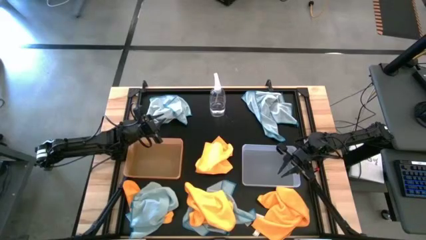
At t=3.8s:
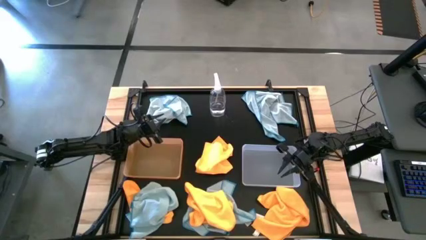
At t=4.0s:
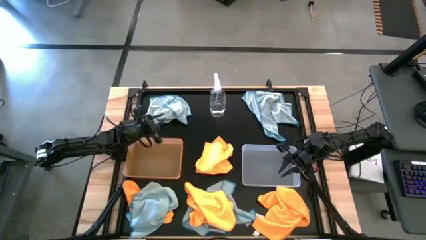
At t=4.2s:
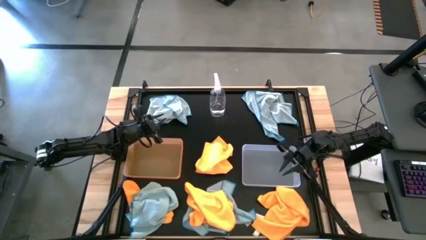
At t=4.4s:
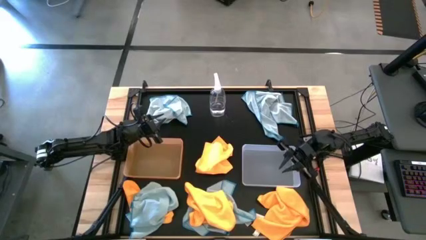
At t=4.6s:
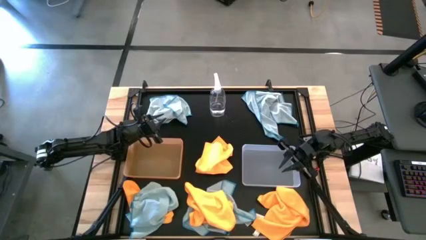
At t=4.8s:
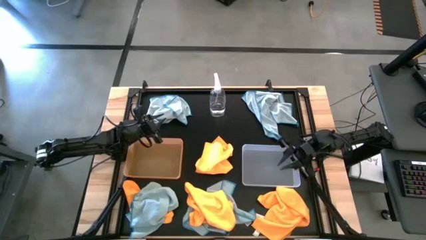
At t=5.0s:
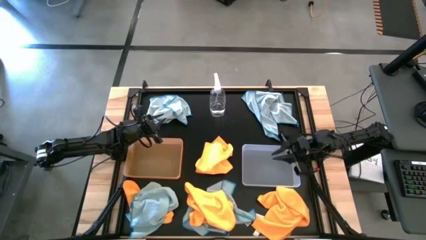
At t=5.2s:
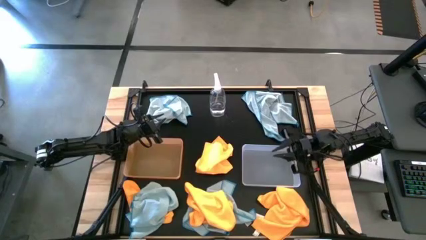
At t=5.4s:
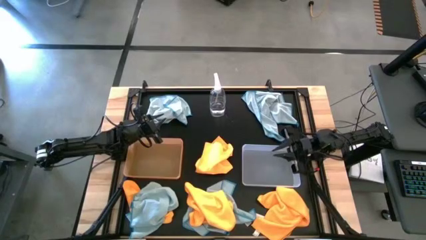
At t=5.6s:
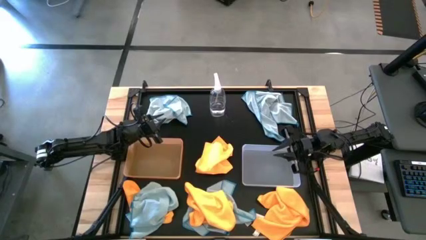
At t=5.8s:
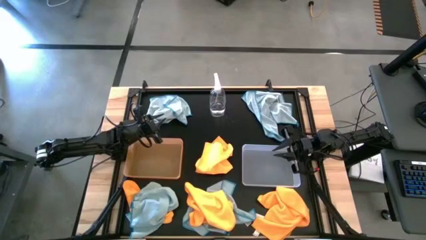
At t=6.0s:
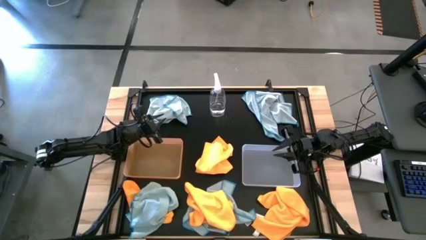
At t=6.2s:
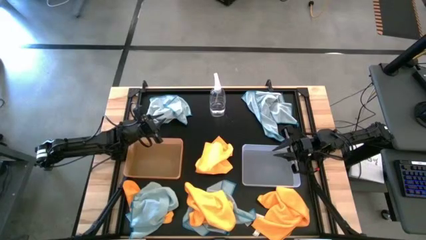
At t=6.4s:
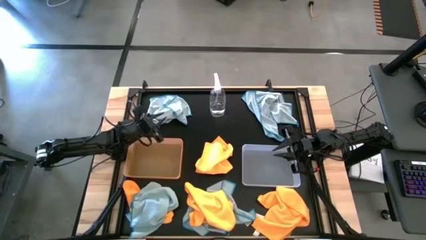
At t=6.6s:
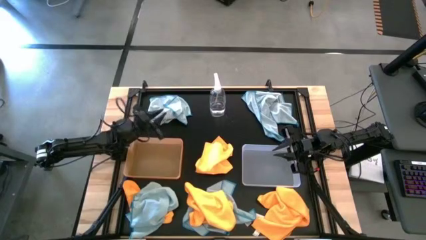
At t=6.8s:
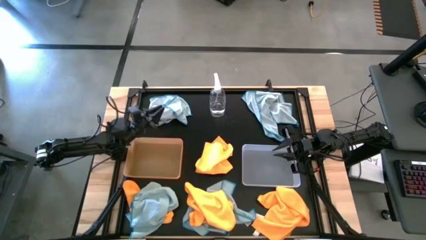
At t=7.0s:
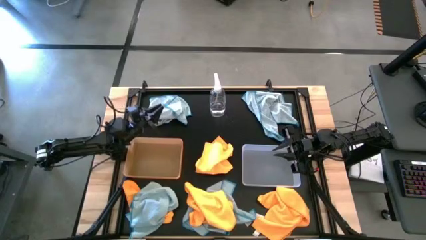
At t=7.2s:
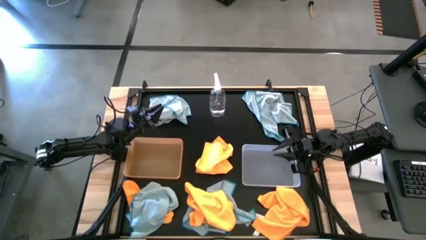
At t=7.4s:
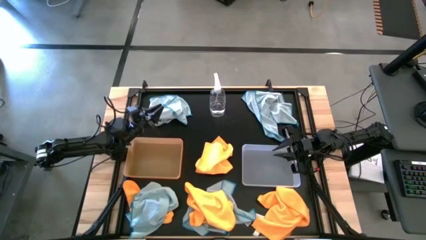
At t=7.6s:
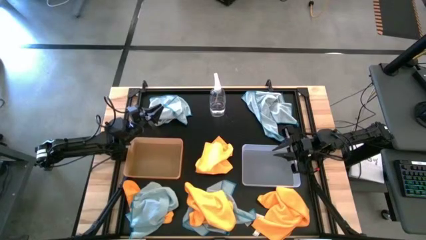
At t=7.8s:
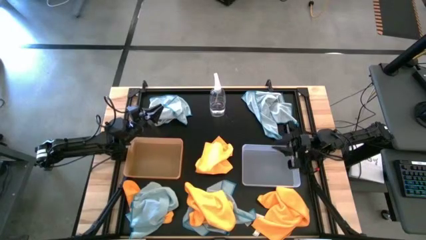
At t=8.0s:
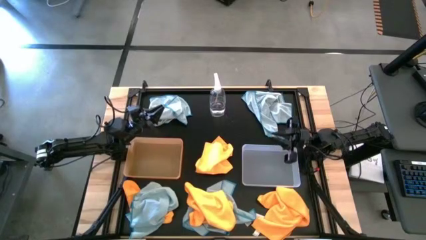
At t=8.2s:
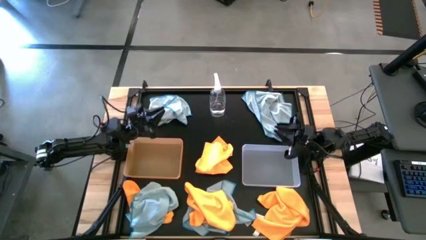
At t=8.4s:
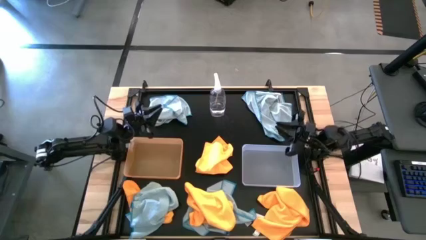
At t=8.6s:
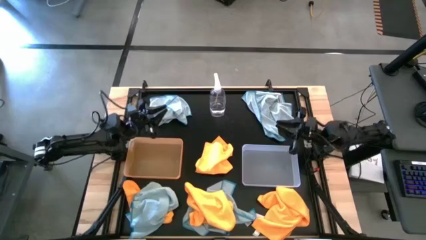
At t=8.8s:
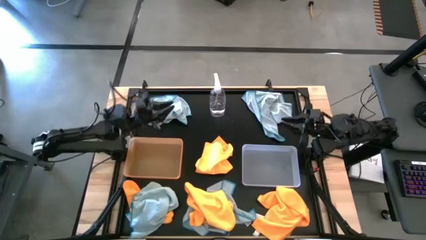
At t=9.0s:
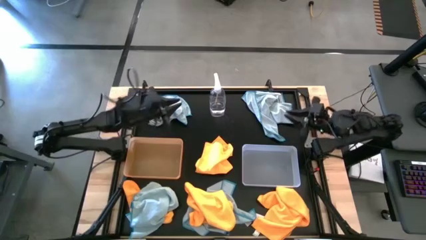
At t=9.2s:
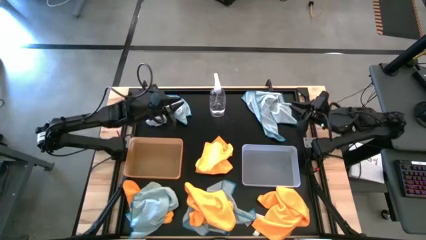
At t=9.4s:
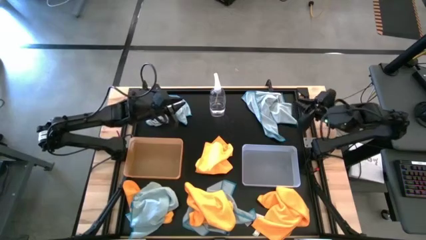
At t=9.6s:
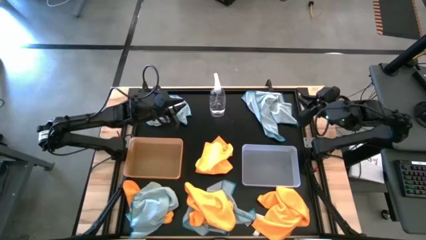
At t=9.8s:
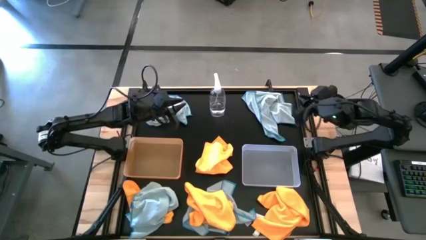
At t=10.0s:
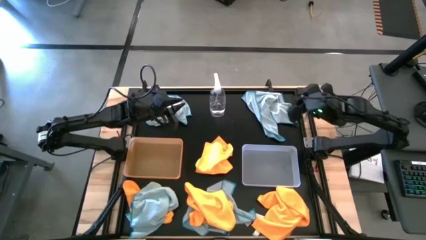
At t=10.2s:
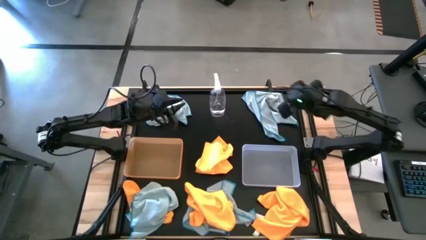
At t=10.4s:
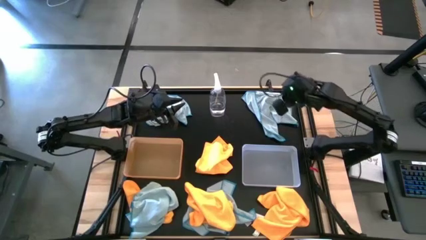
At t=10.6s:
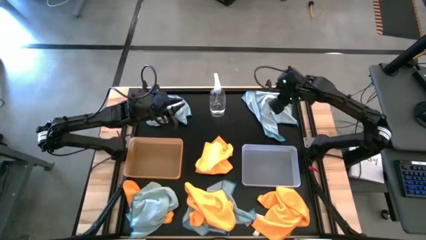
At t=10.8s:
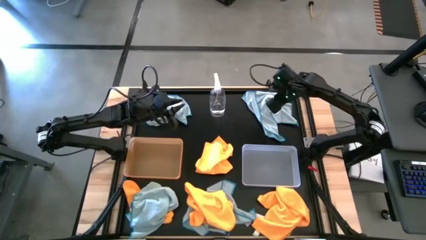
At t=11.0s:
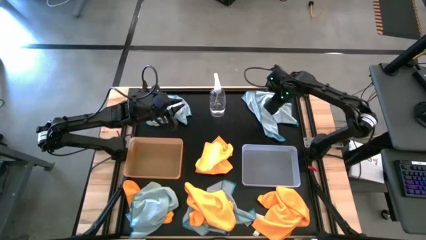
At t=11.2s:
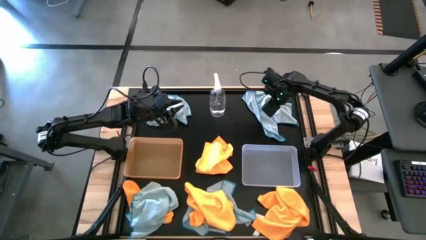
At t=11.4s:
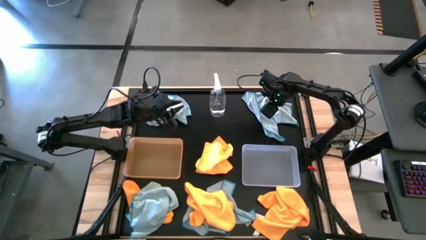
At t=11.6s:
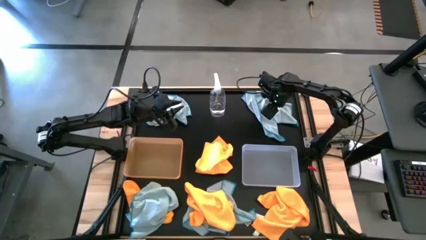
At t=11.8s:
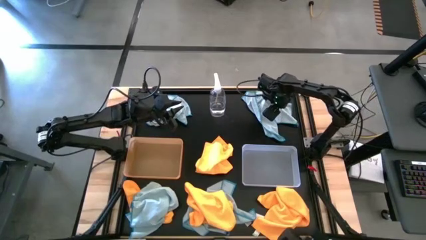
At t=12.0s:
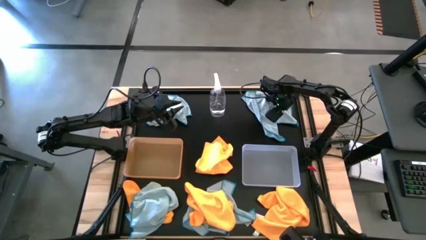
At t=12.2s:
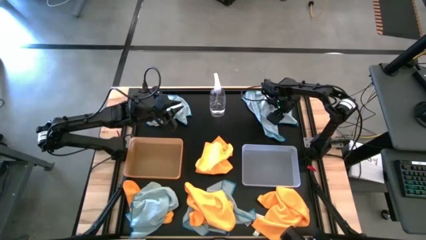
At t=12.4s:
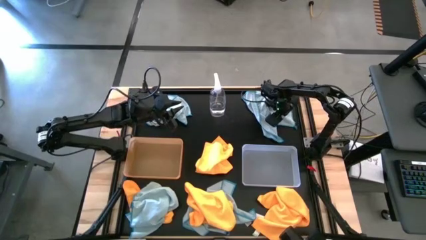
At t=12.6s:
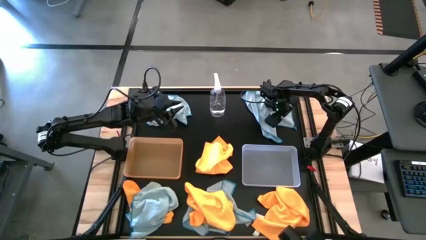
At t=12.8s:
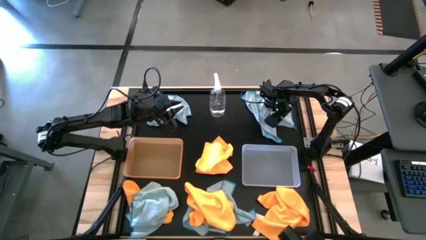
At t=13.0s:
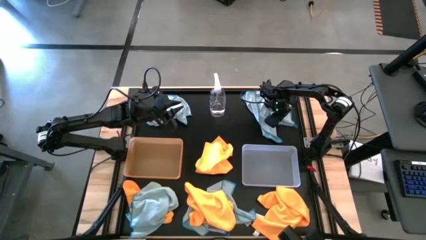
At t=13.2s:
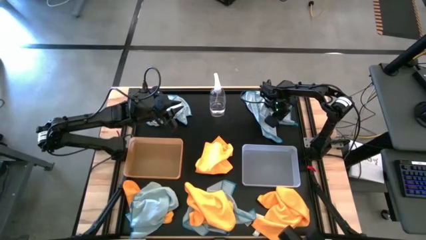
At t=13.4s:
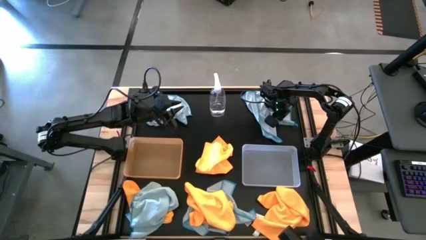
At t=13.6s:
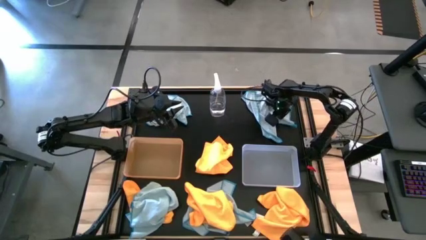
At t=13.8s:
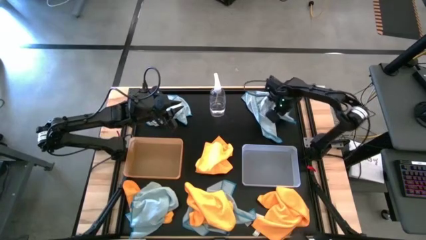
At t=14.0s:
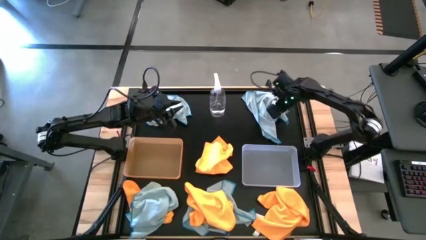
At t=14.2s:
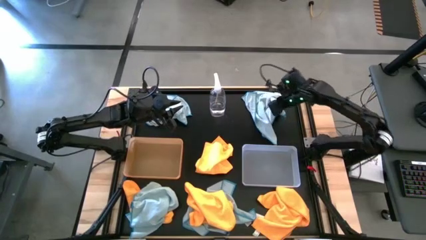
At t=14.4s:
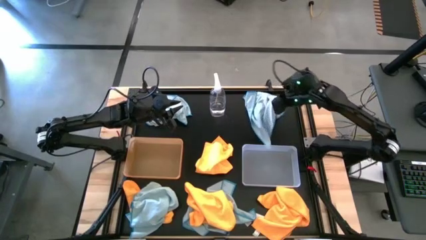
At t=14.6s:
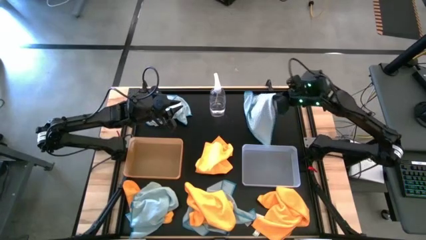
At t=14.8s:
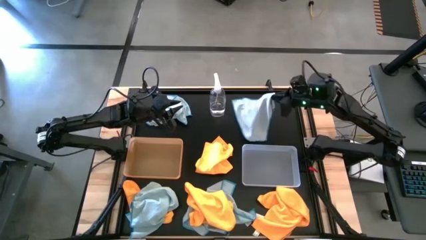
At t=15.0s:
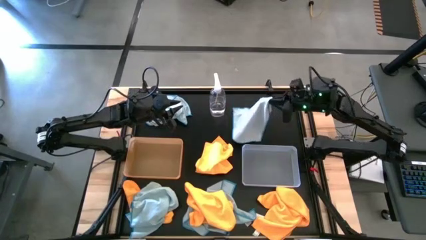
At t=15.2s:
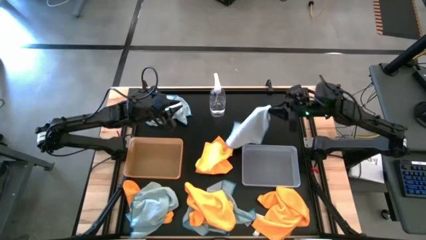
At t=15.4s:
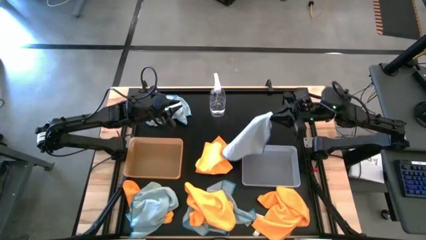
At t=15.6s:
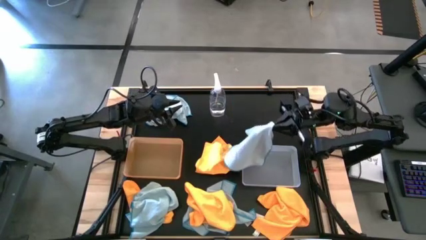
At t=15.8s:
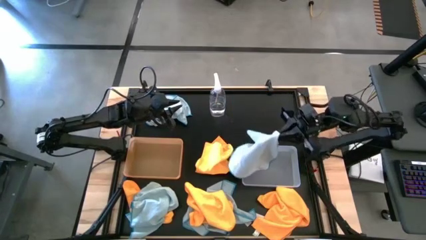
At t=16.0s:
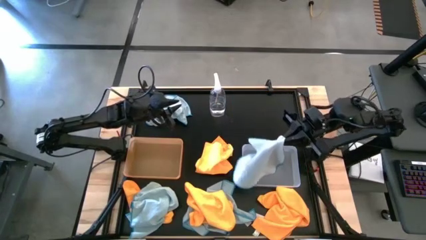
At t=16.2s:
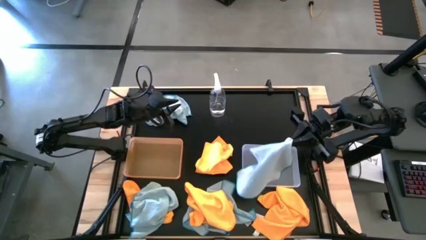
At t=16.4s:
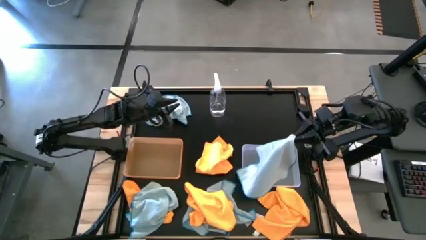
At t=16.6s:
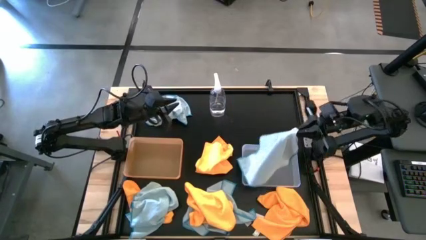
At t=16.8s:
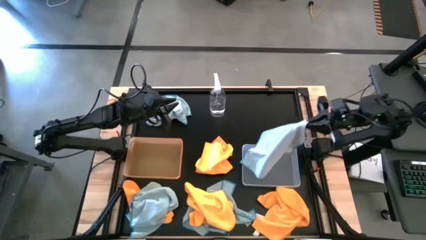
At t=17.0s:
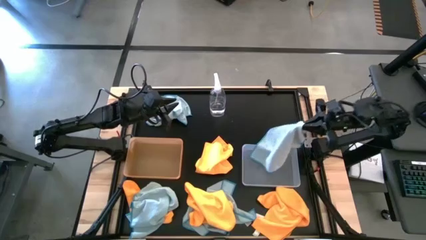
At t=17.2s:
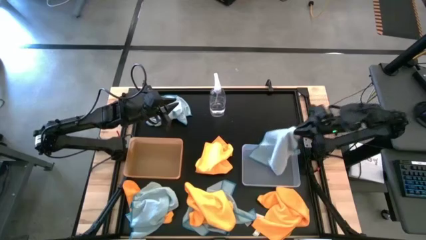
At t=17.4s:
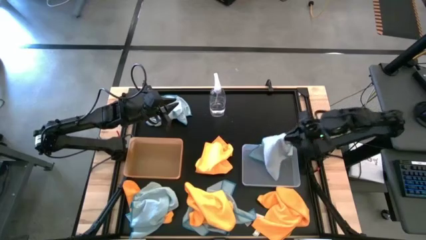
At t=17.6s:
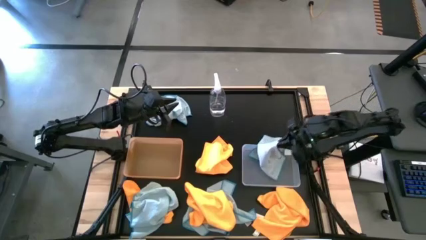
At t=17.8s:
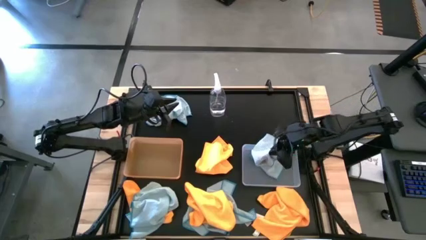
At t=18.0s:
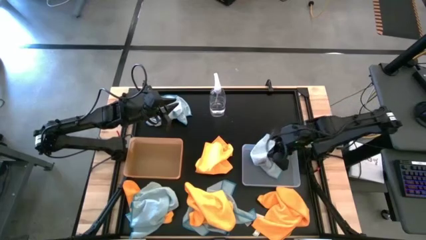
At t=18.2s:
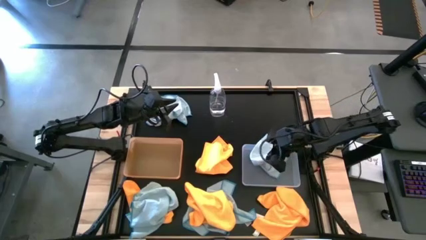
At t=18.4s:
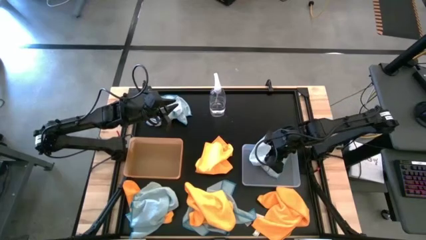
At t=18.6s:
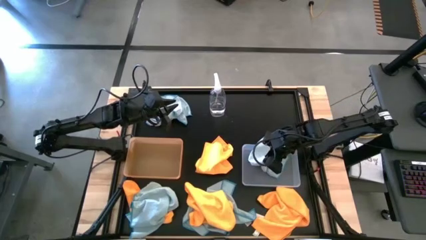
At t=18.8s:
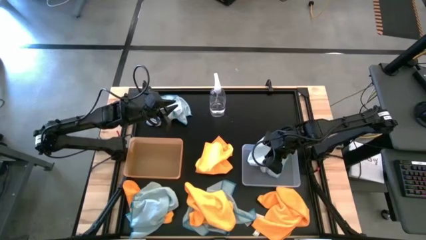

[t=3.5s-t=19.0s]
Task: Sort microfiber towel by color & place in baskets
Put the top right blue microfiber cloth into the transparent bin
